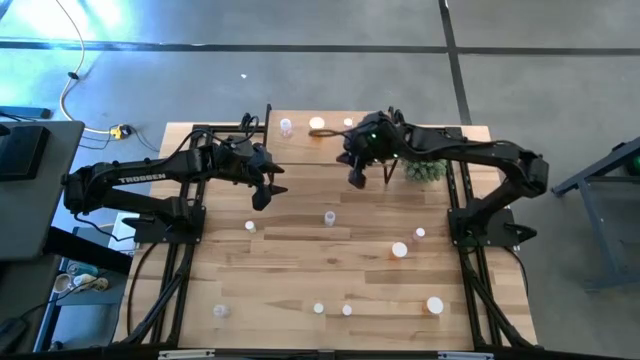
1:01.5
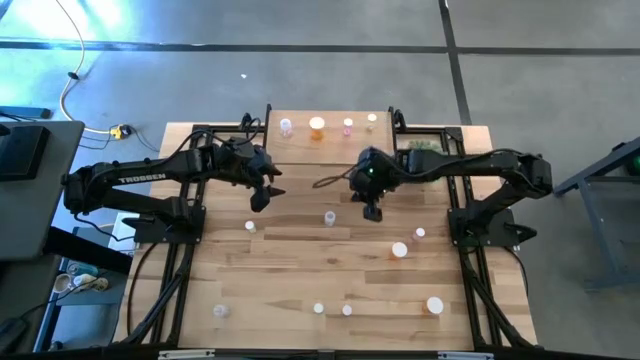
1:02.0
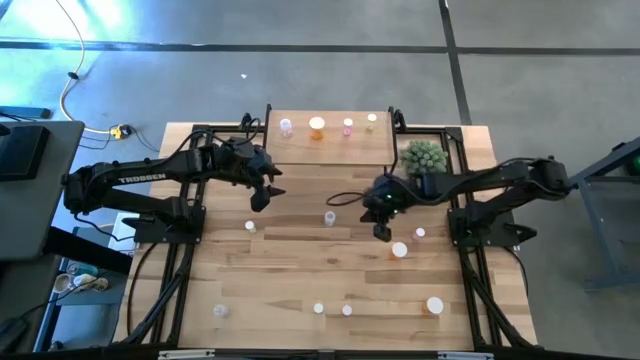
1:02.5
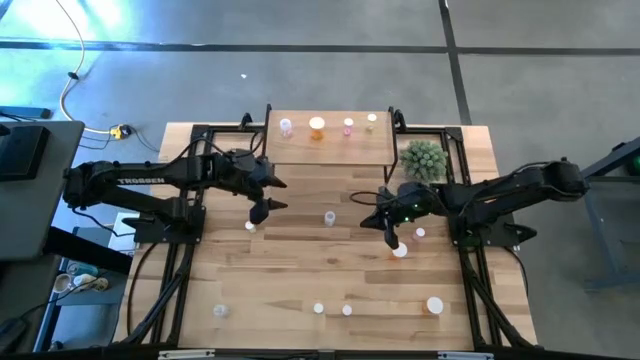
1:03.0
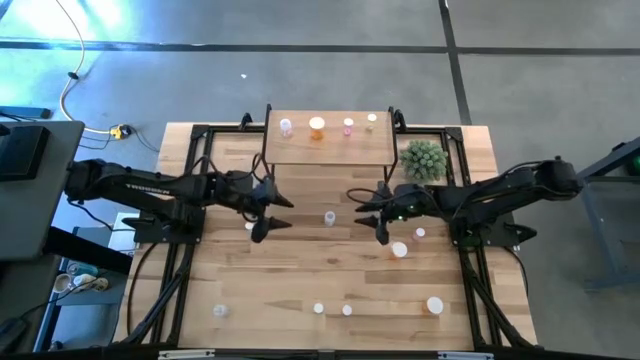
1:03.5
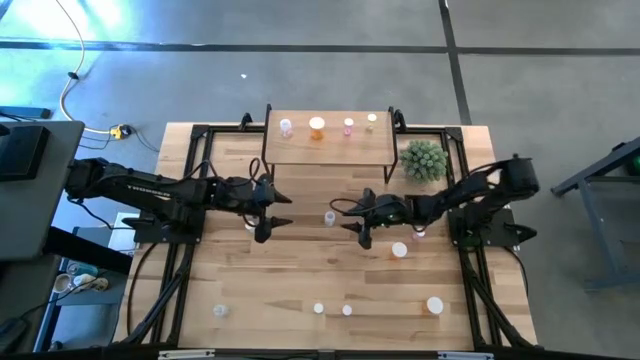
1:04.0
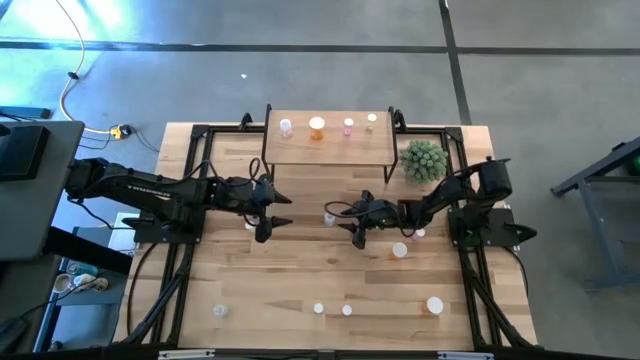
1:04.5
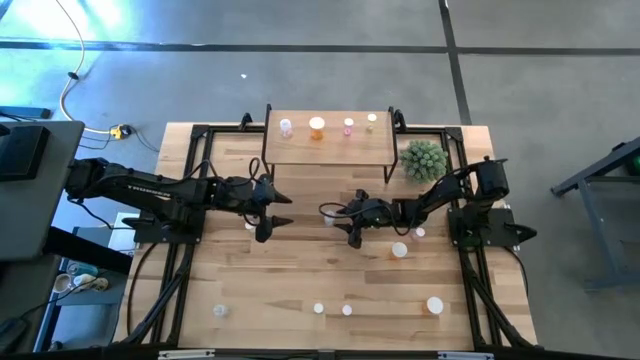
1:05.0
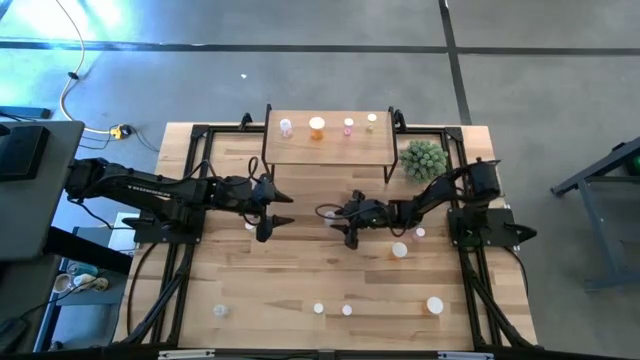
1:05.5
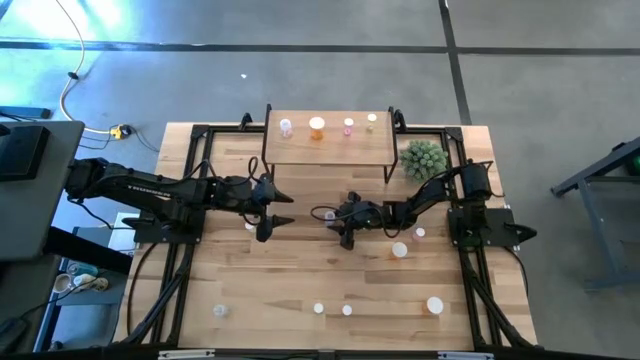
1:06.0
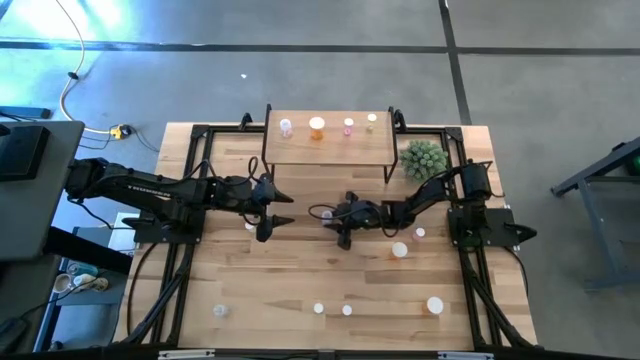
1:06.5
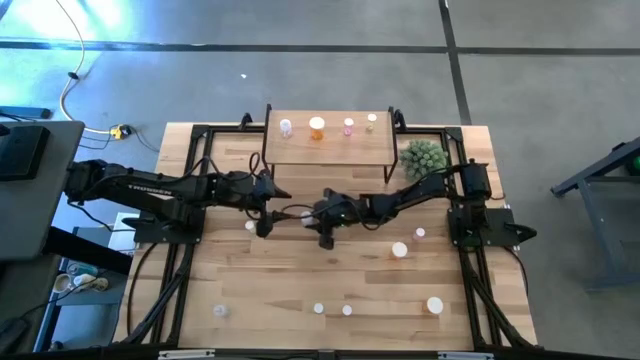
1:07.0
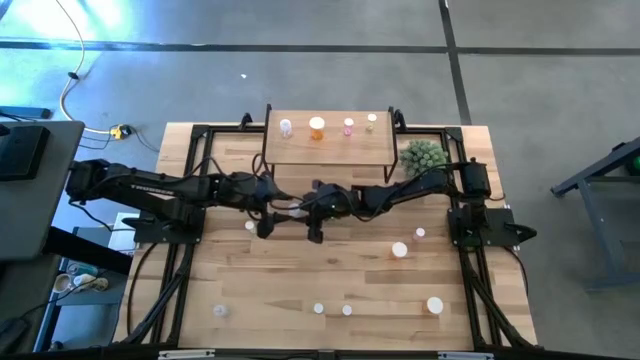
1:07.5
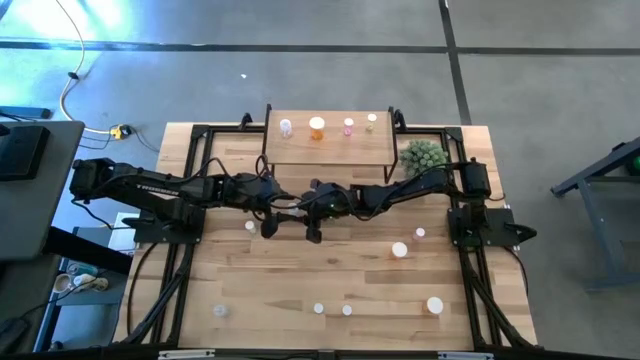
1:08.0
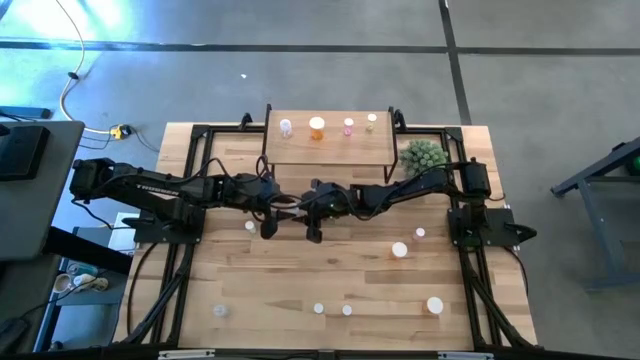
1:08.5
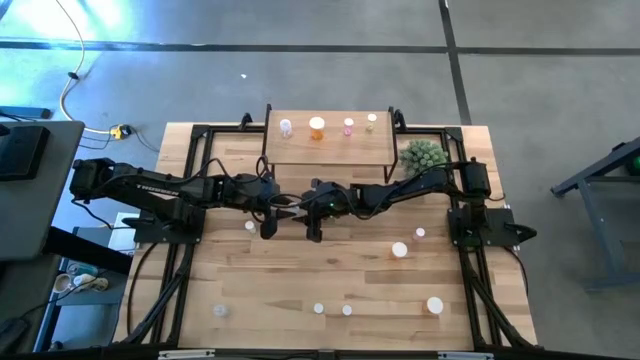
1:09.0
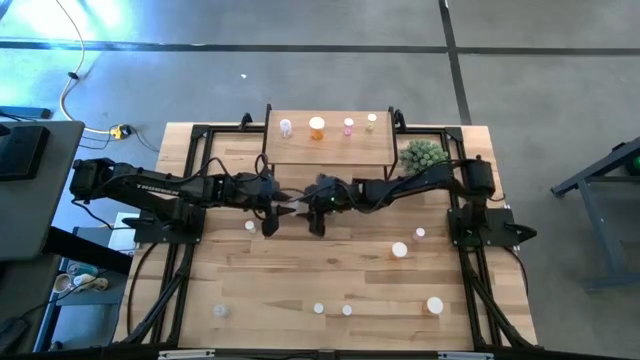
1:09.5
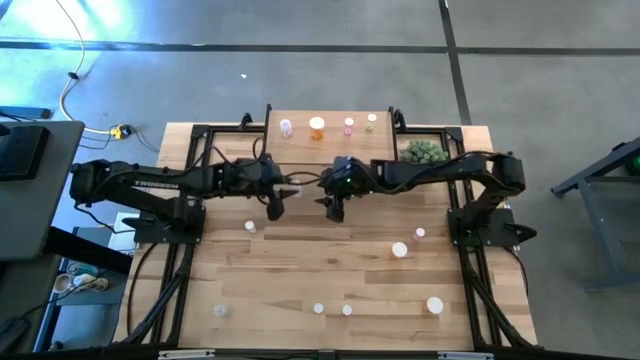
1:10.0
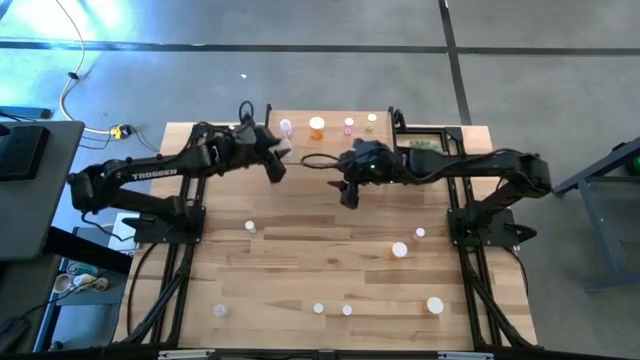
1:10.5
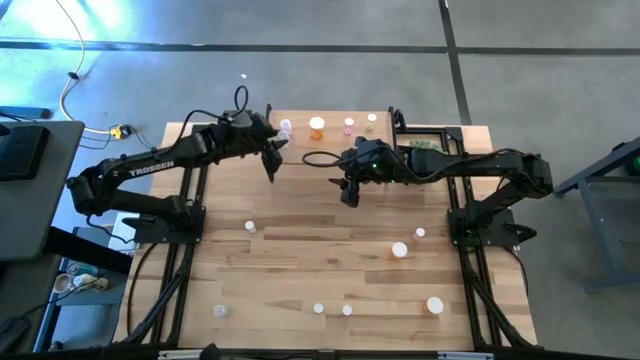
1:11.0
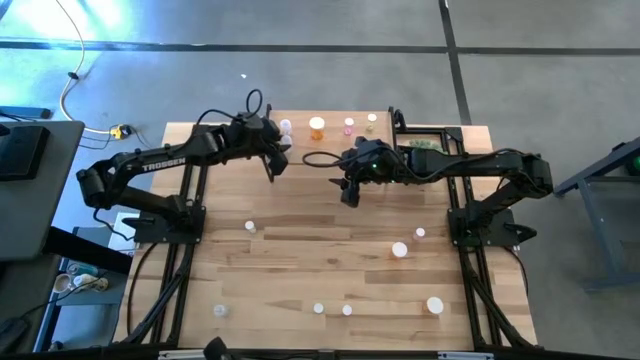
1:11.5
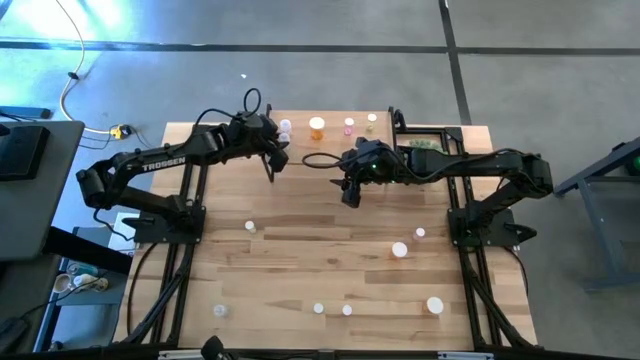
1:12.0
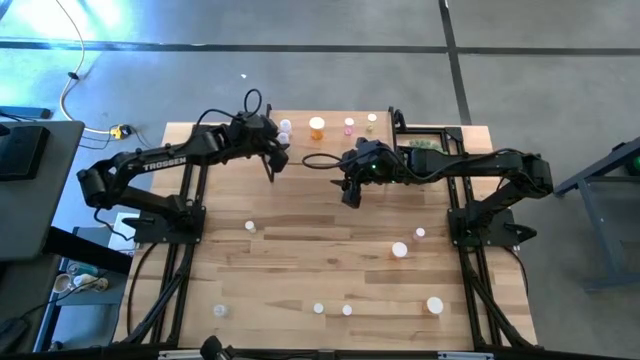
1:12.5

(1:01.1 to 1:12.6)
Task: Pick and place medicine bottles onto shelf by color
Put the top transparent pill bottle aligned with the other transparent pill bottle on the shelf

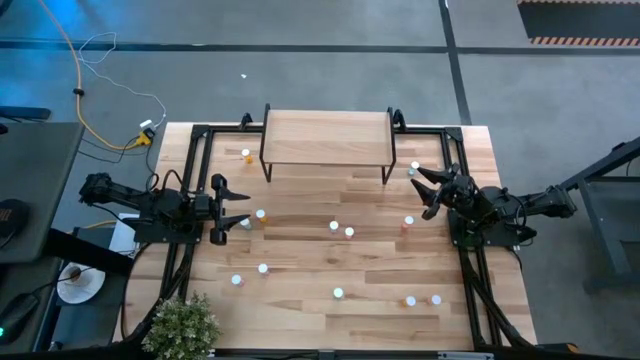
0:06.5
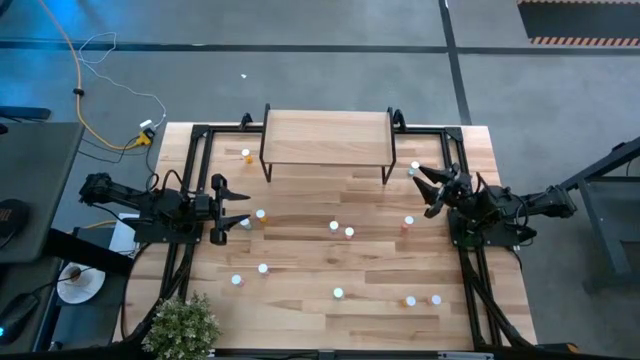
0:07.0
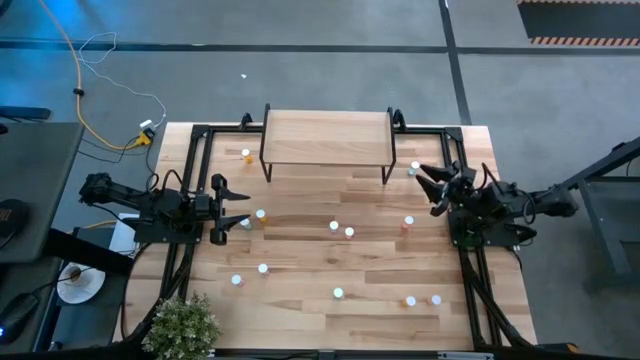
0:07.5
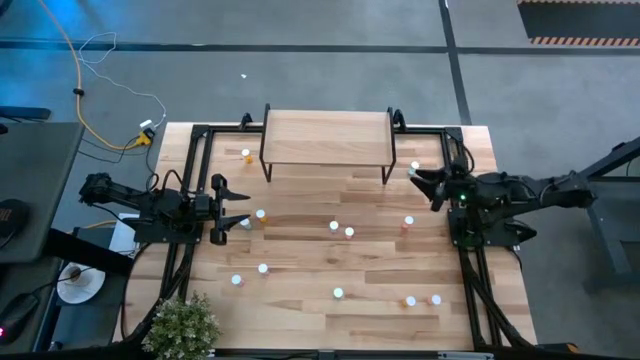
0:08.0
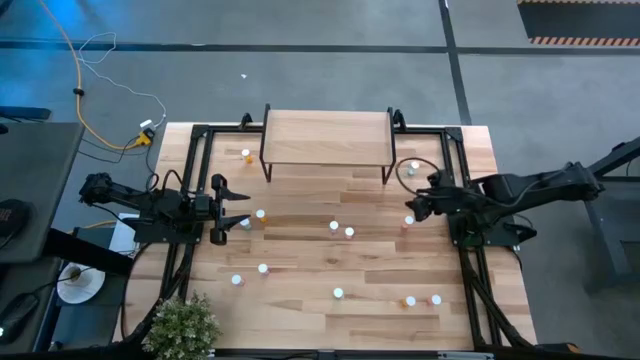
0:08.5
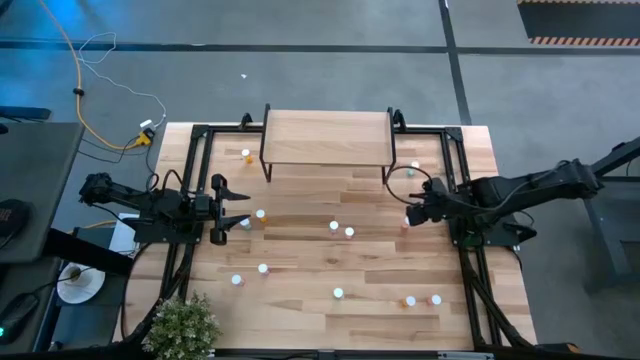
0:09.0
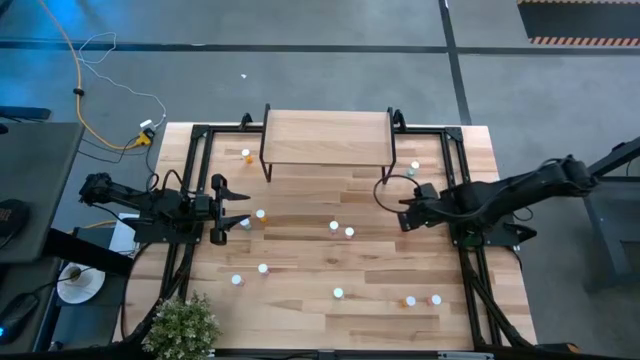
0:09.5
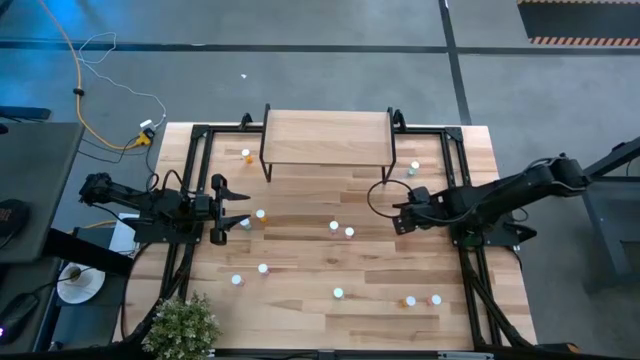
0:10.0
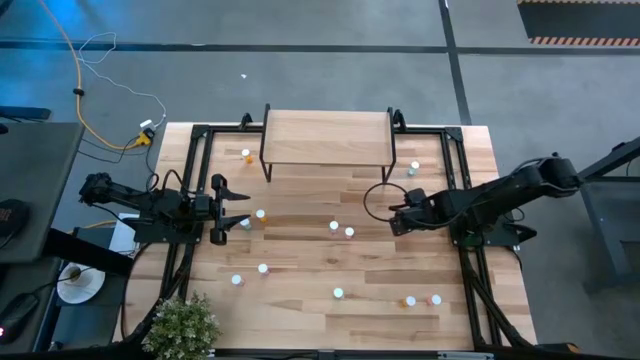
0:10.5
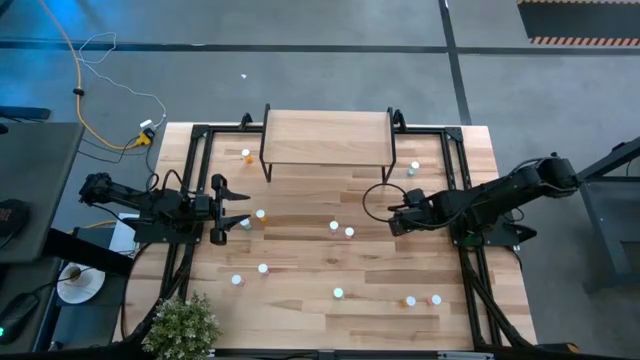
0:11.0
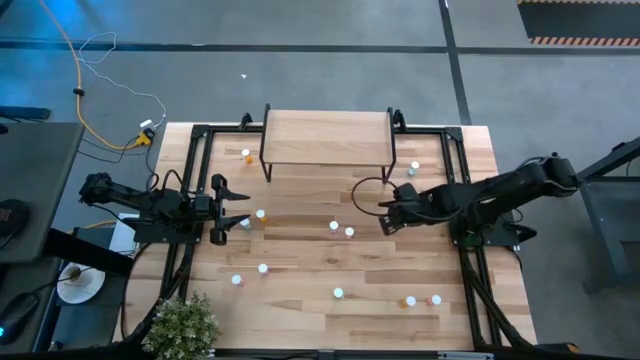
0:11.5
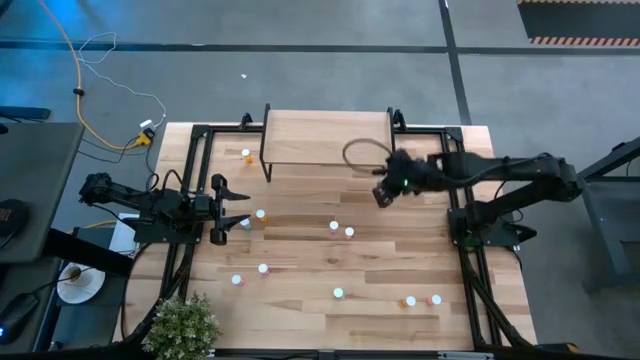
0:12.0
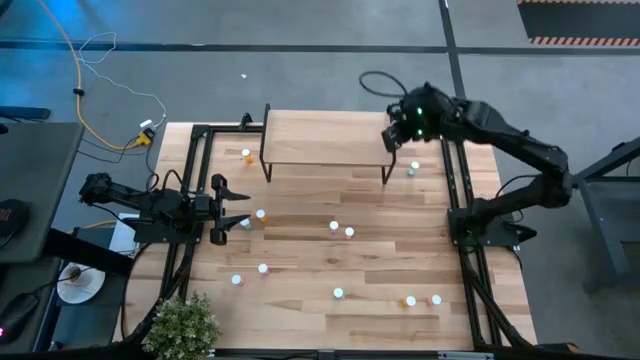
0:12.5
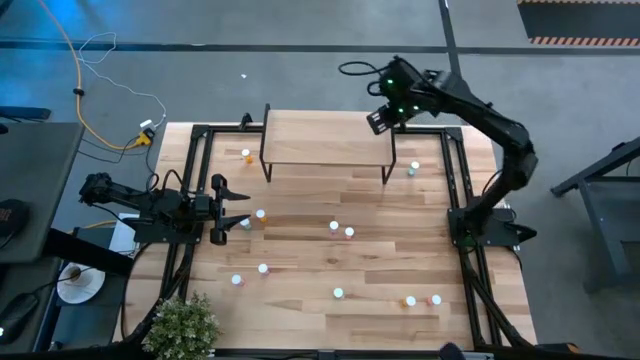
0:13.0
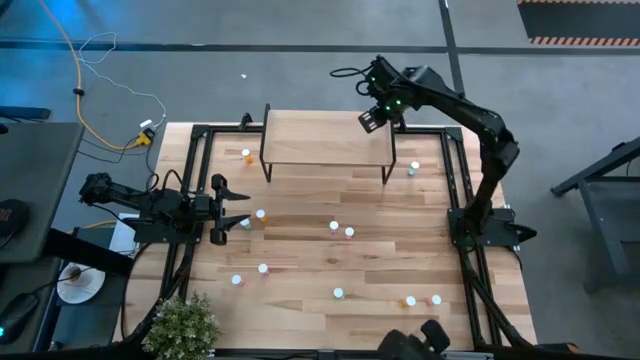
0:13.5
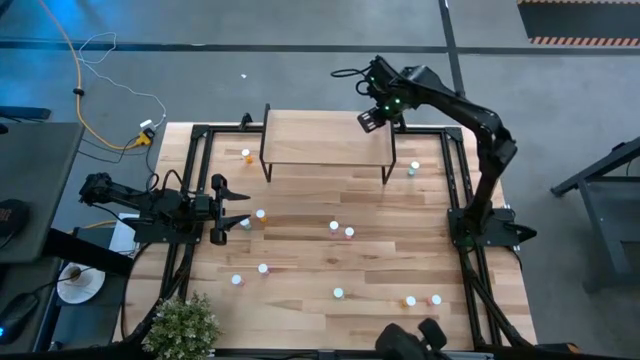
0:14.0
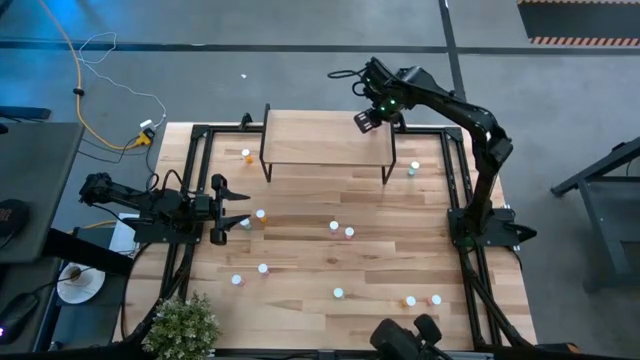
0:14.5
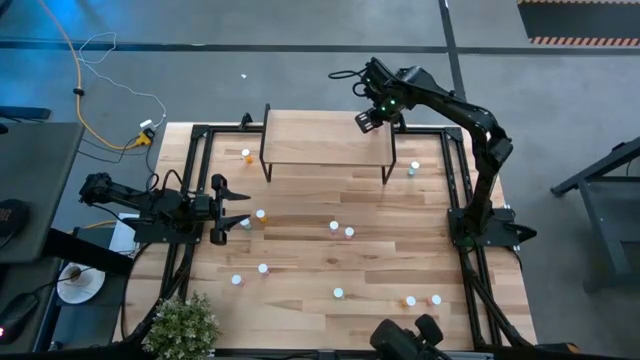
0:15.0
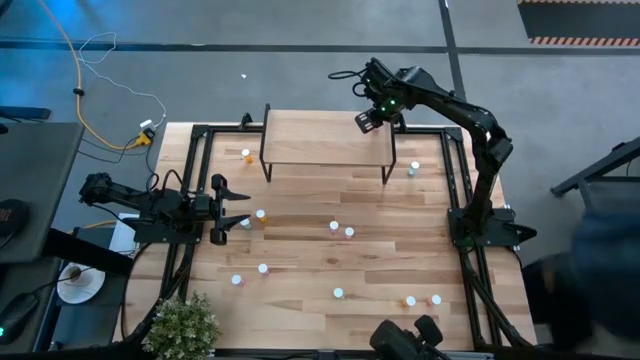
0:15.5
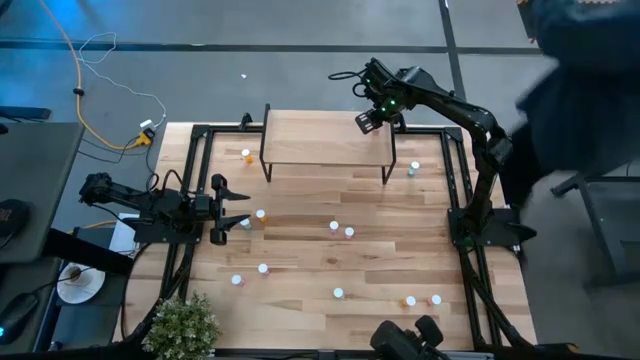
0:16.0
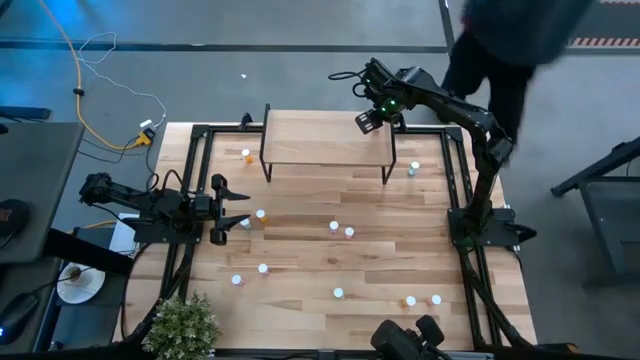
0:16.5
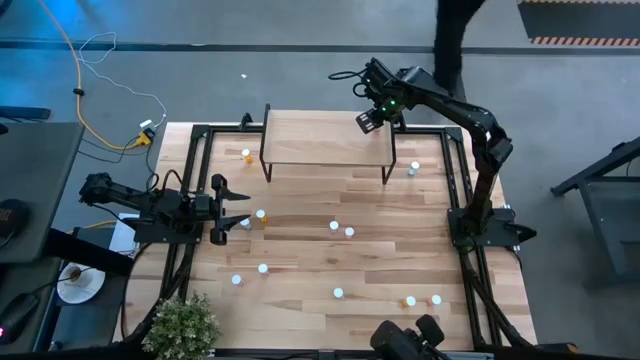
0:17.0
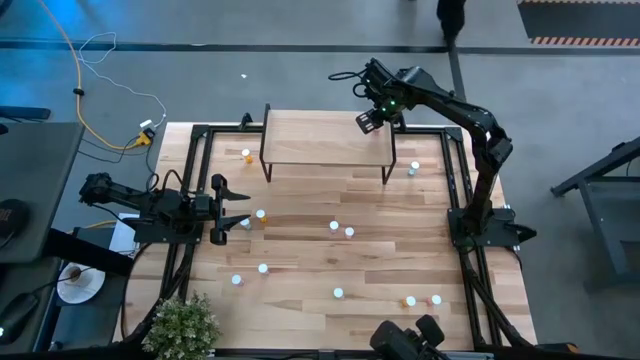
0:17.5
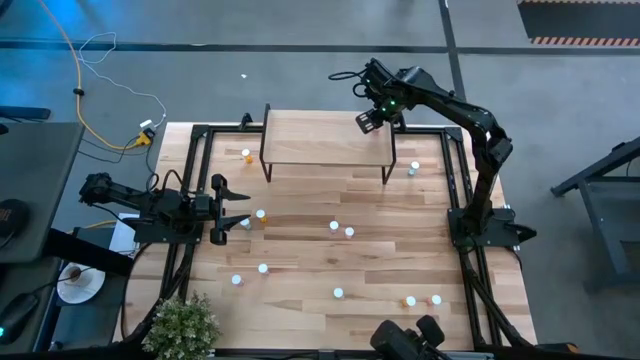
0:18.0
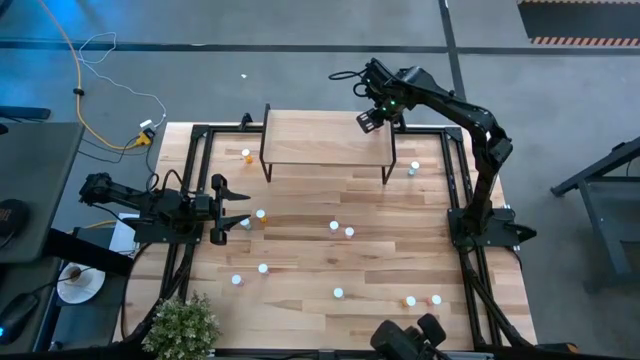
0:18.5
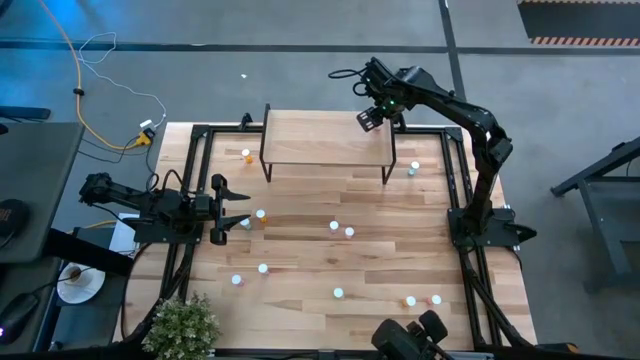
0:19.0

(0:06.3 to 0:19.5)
Task: Pick and place medicine bottles onto shelf by color
Put the top red pill bottle on the shelf
